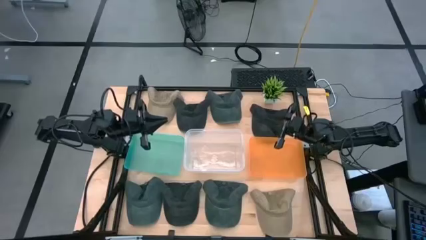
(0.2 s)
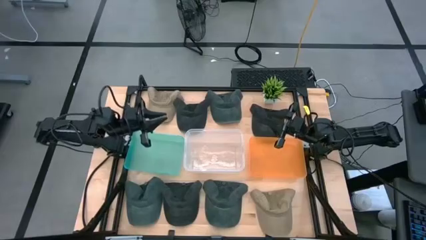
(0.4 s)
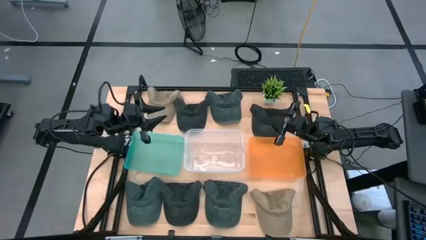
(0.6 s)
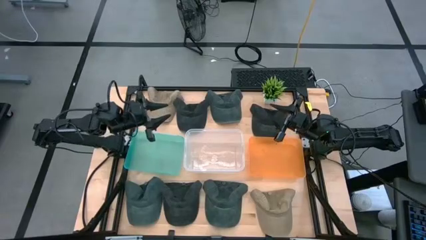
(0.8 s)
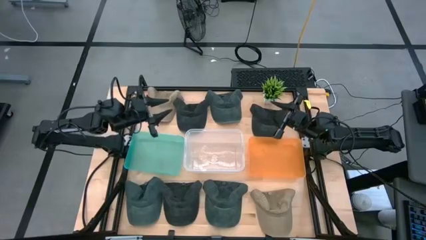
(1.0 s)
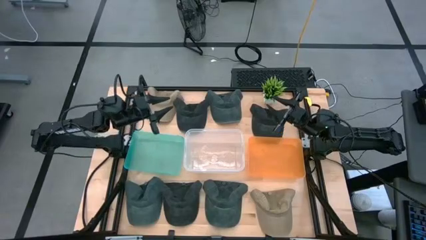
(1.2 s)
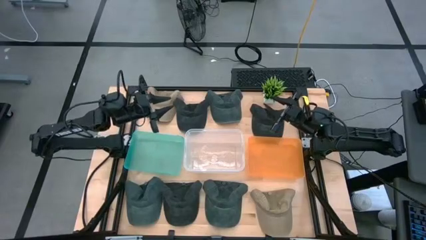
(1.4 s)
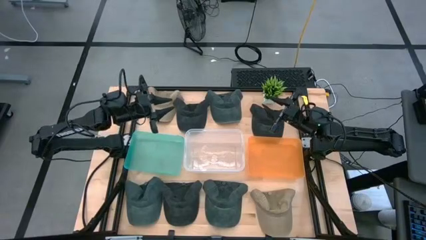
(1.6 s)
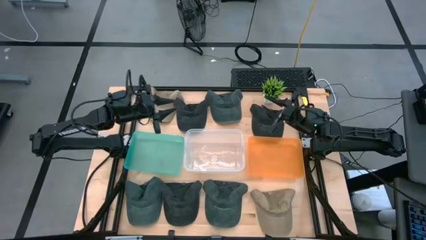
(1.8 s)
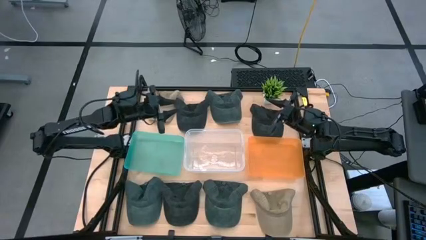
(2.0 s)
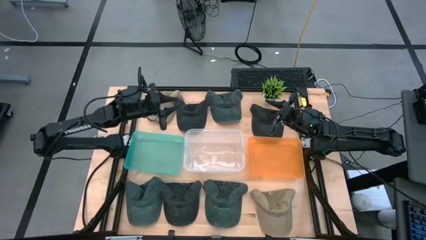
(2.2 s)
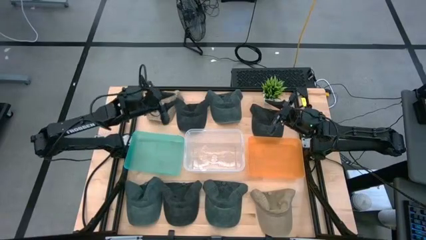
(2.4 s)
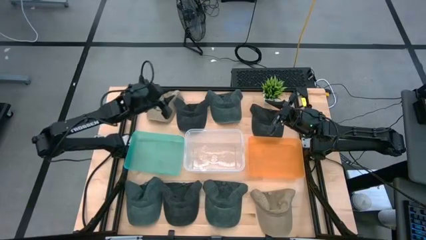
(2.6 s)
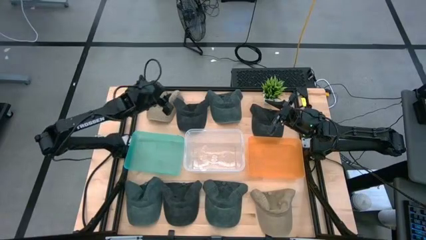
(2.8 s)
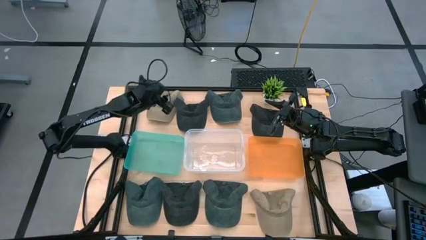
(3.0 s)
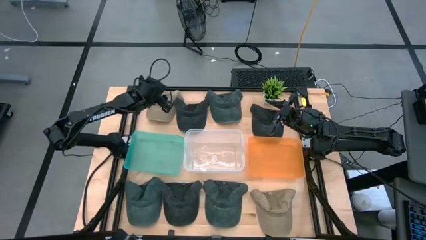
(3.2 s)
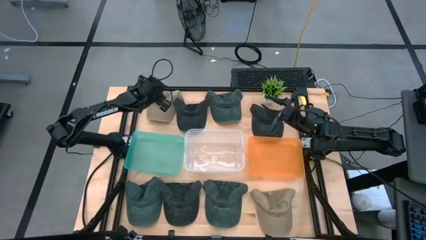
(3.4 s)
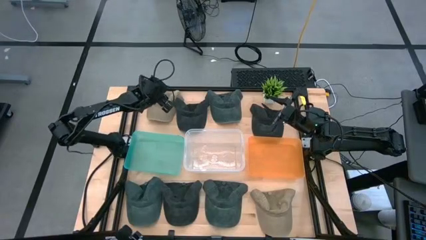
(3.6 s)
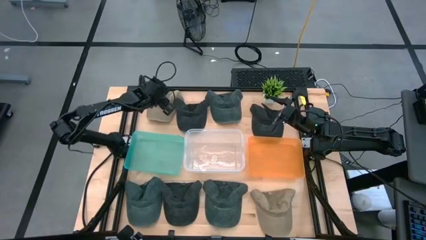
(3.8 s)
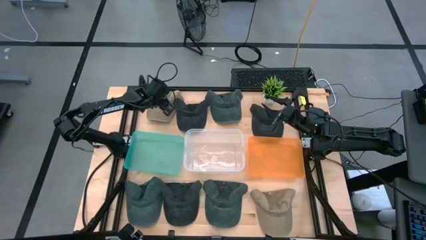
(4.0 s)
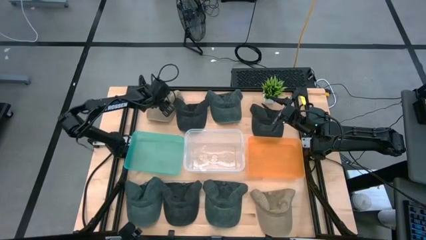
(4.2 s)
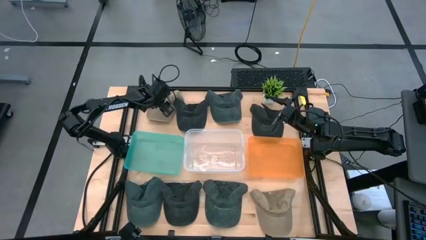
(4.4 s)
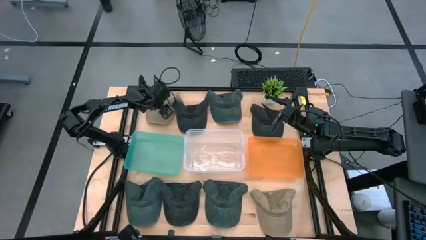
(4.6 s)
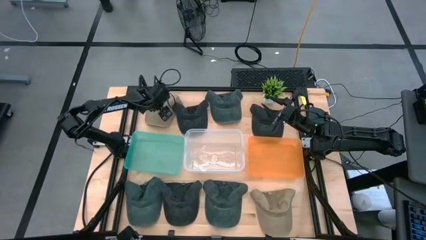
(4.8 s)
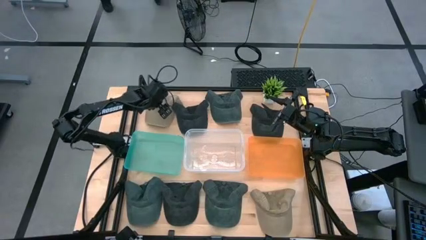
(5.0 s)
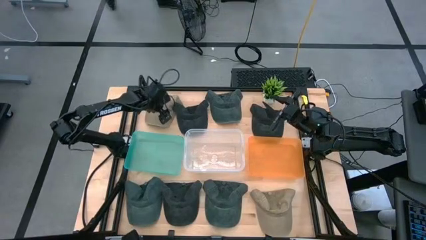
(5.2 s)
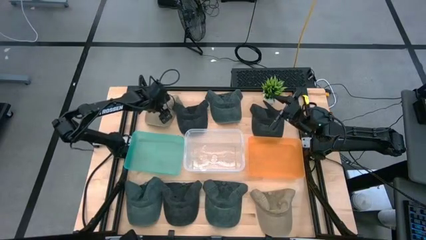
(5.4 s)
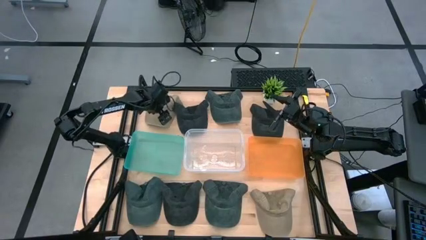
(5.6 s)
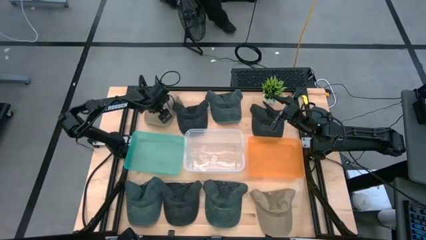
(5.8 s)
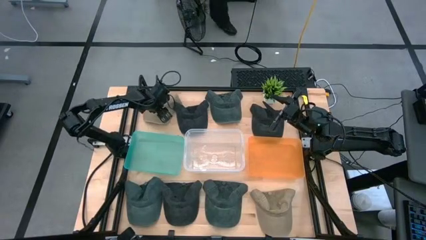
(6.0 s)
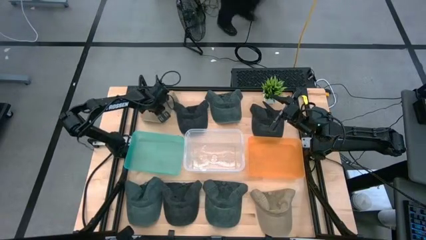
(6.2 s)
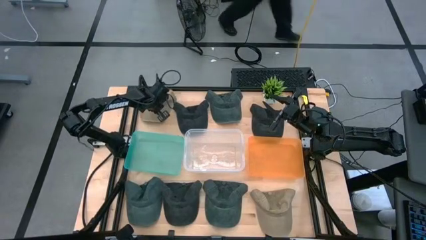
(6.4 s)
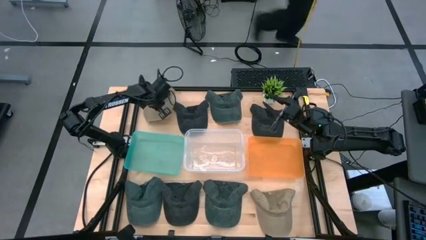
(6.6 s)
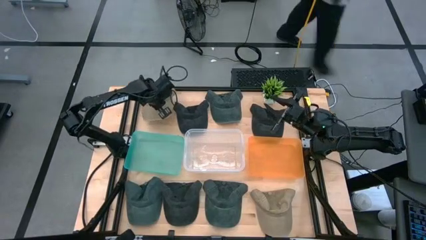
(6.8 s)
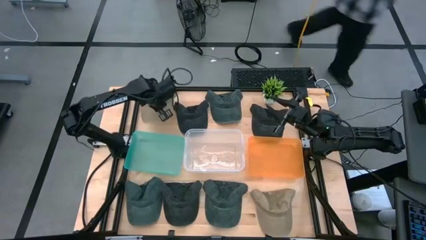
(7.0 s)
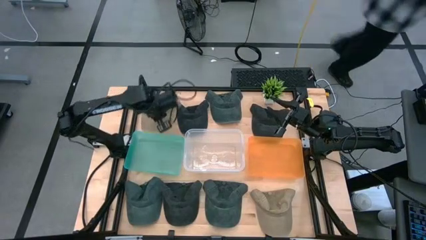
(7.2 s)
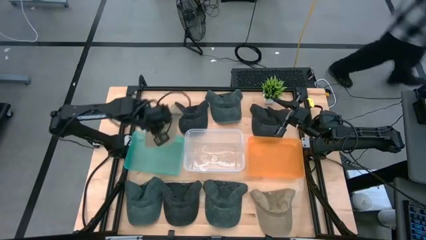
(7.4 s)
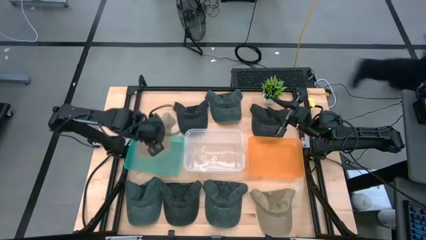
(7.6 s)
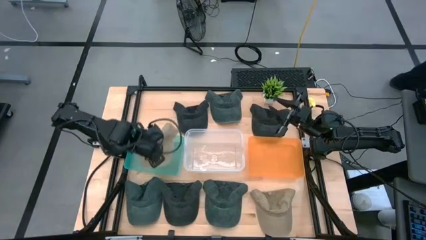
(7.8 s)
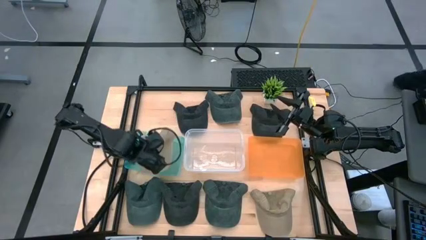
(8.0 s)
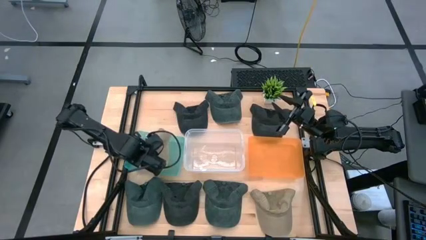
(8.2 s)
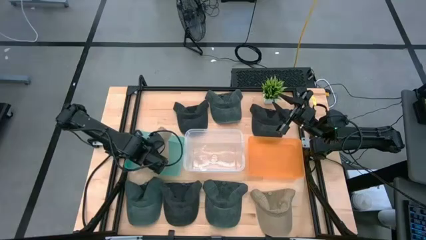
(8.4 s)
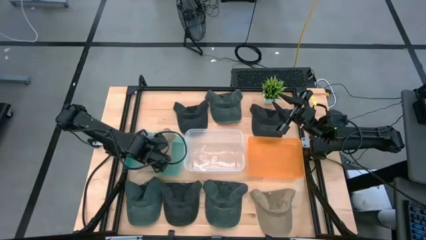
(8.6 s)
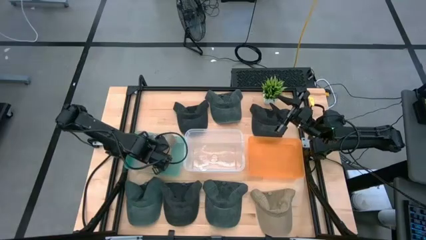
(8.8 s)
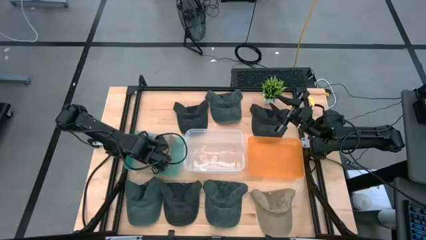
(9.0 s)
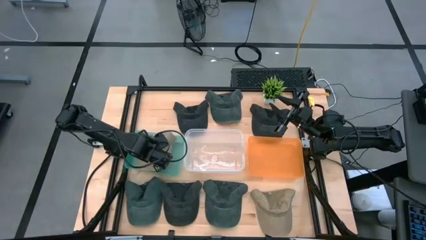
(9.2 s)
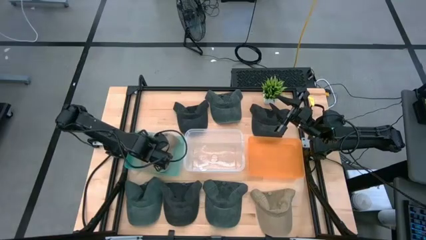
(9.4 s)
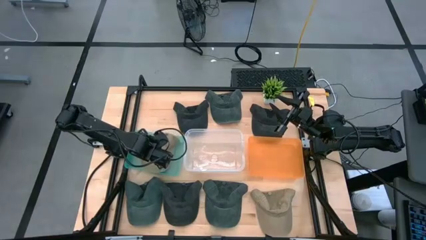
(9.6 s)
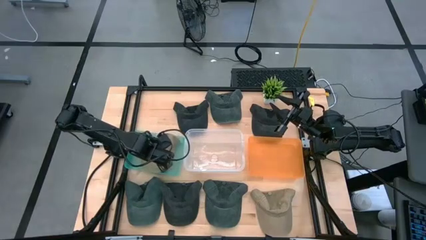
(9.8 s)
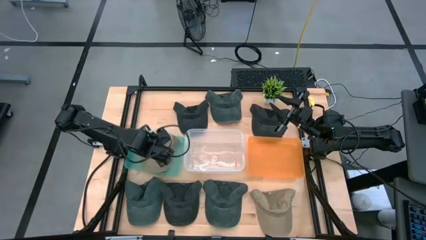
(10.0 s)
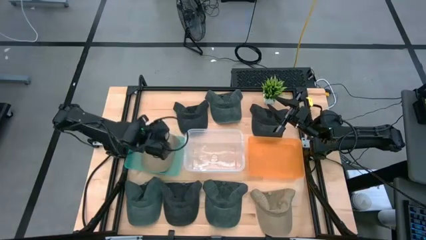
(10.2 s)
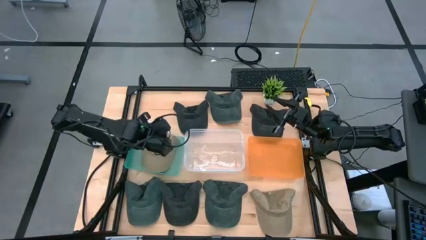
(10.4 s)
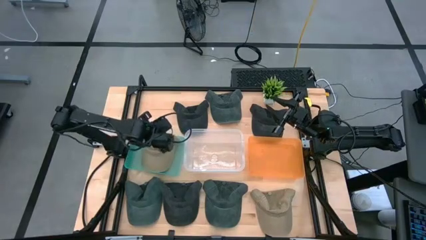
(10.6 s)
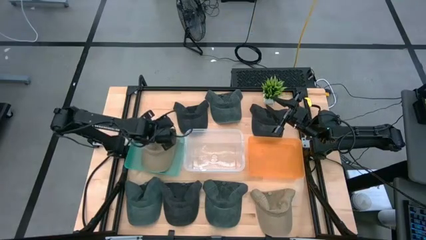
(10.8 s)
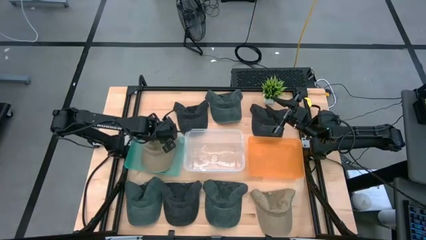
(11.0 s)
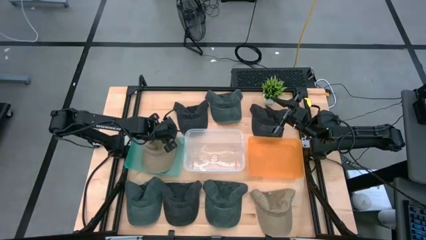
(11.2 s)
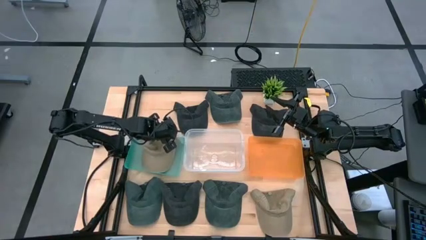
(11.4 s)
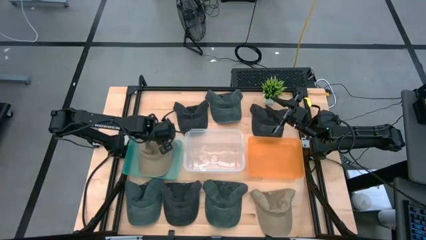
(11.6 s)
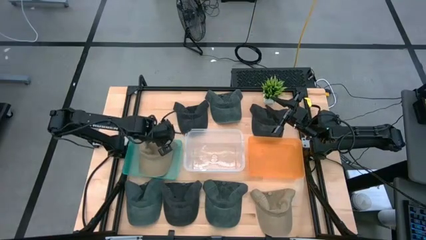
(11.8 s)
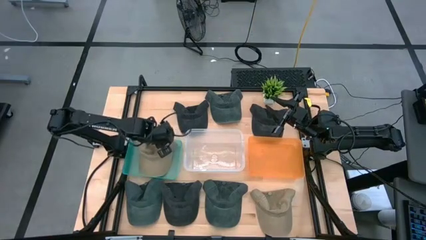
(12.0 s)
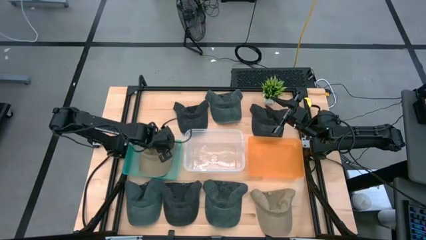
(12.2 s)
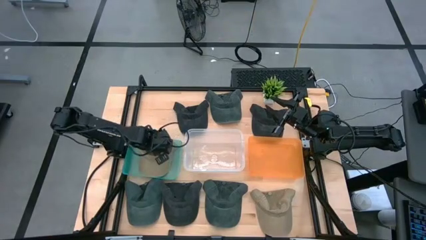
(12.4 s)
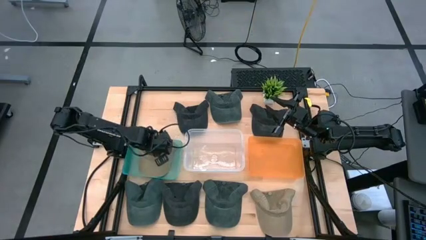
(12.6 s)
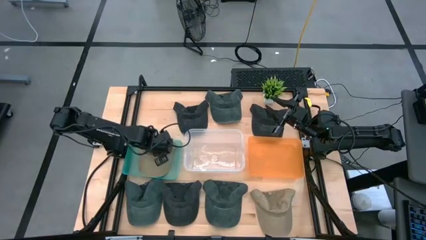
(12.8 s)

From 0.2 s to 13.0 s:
Task: Pick & Place hat
Put the top brown cap into the green bin
